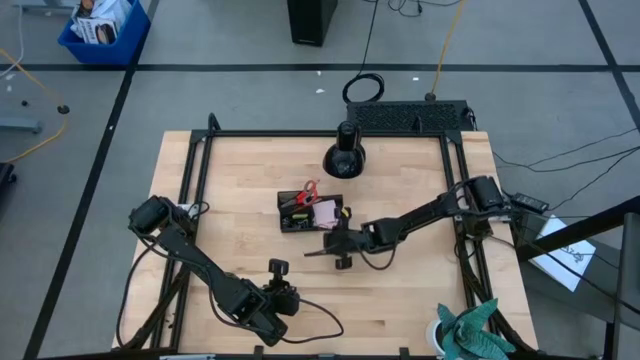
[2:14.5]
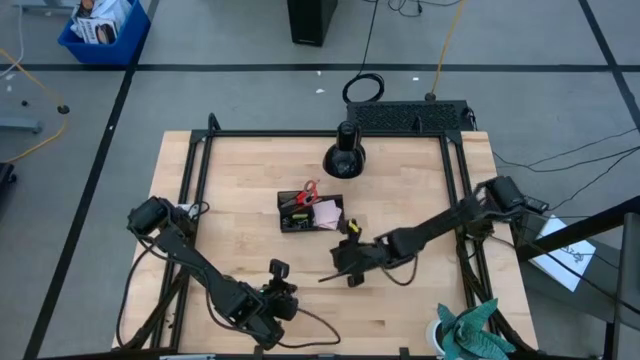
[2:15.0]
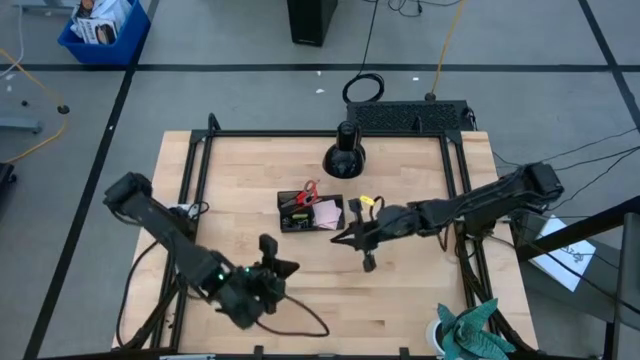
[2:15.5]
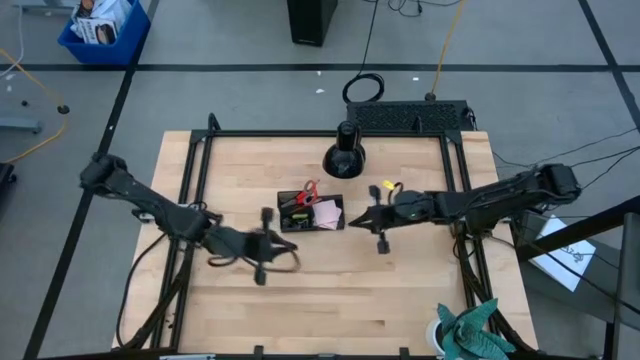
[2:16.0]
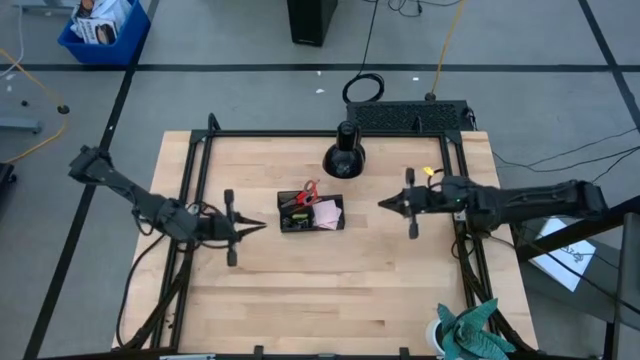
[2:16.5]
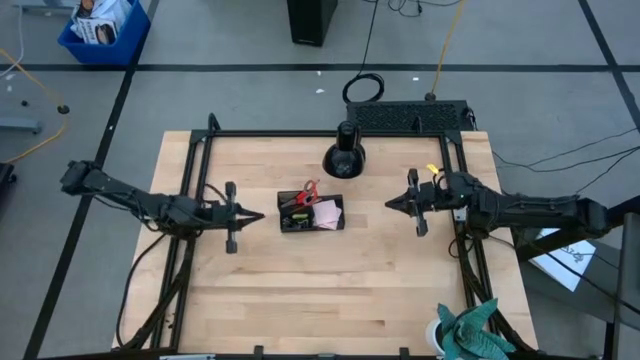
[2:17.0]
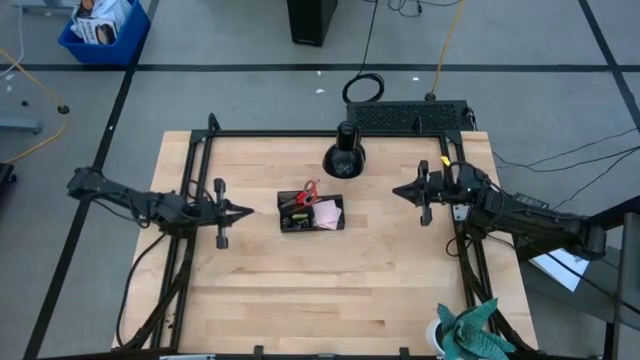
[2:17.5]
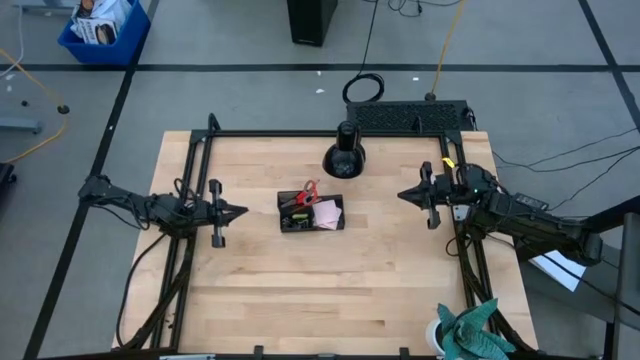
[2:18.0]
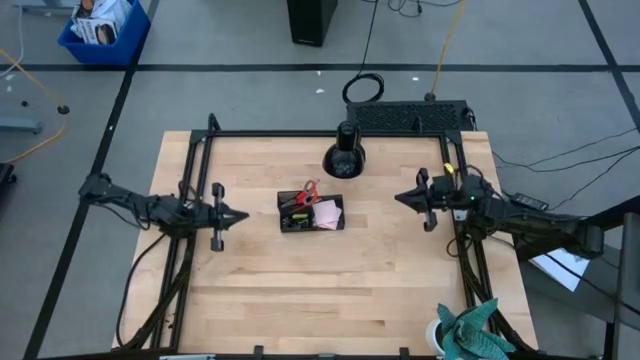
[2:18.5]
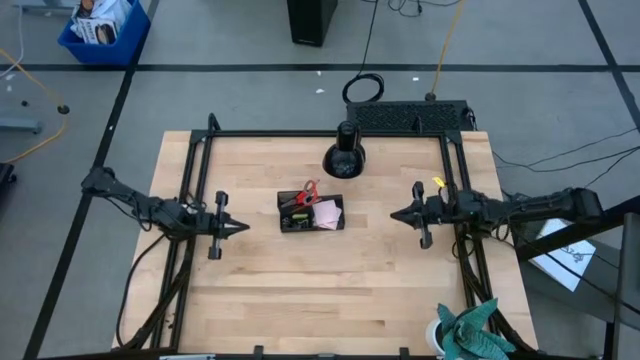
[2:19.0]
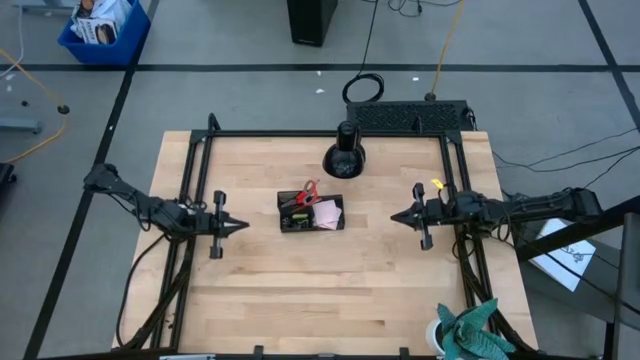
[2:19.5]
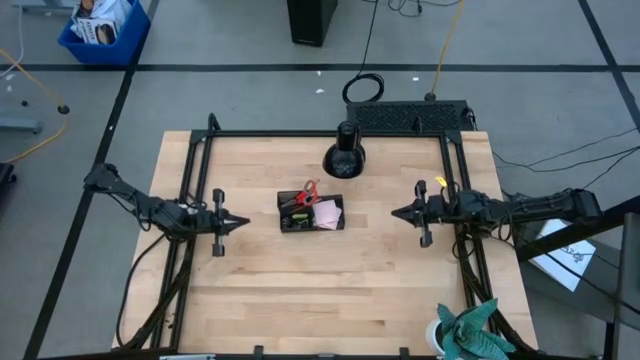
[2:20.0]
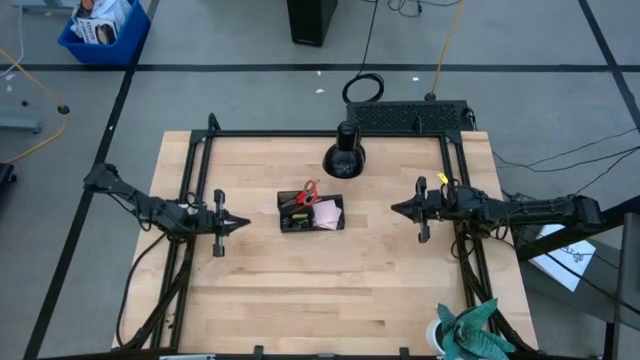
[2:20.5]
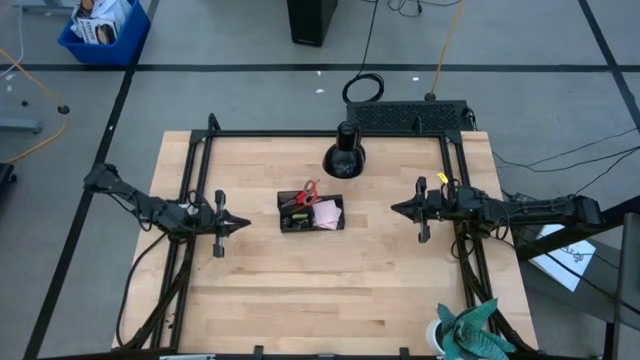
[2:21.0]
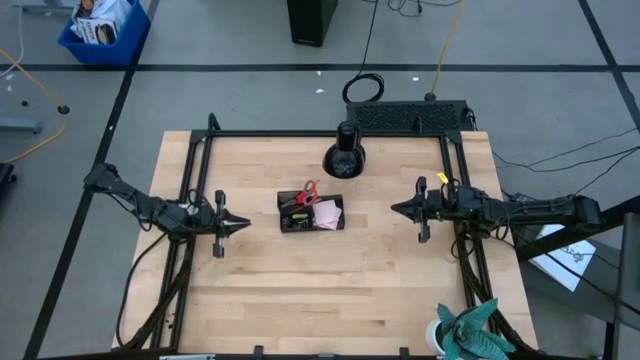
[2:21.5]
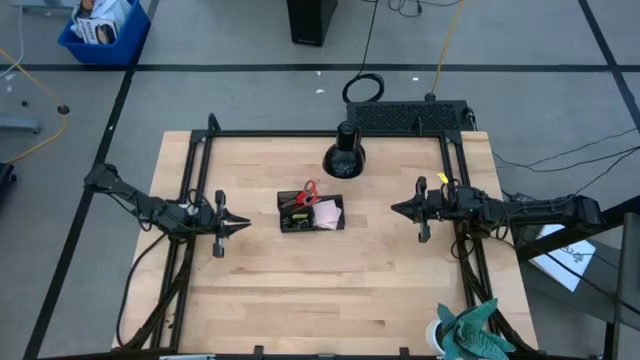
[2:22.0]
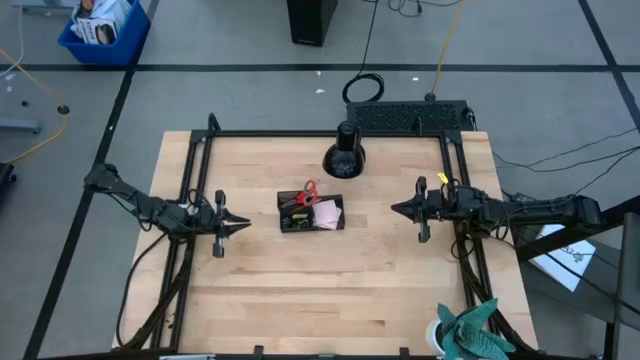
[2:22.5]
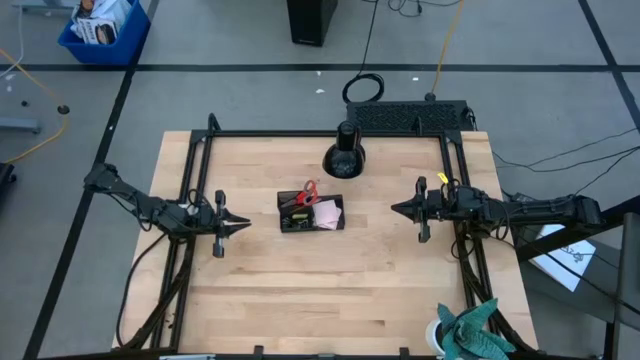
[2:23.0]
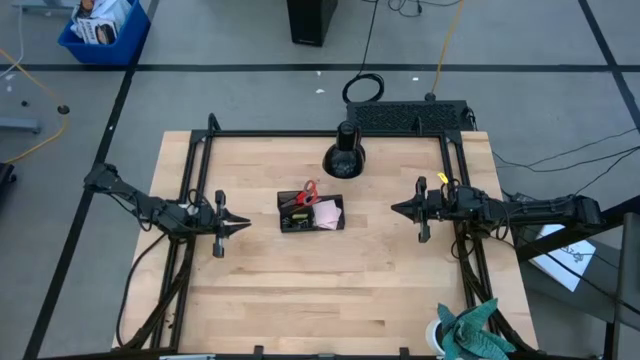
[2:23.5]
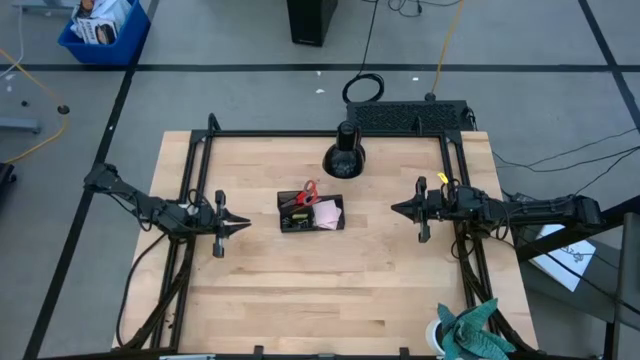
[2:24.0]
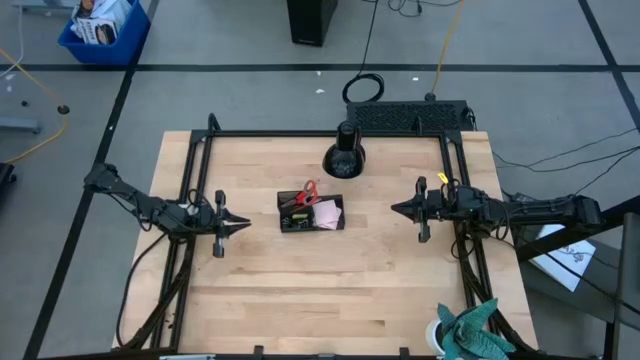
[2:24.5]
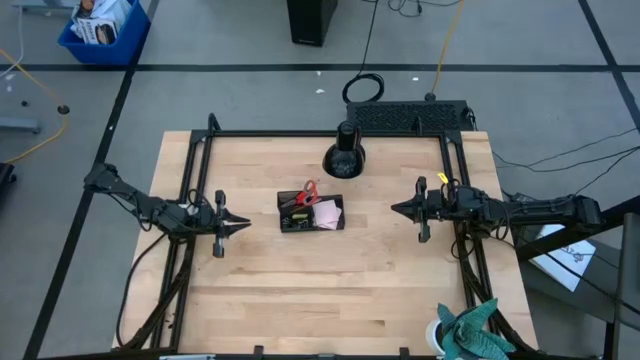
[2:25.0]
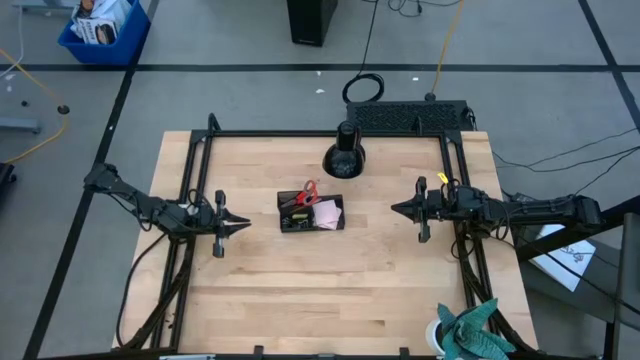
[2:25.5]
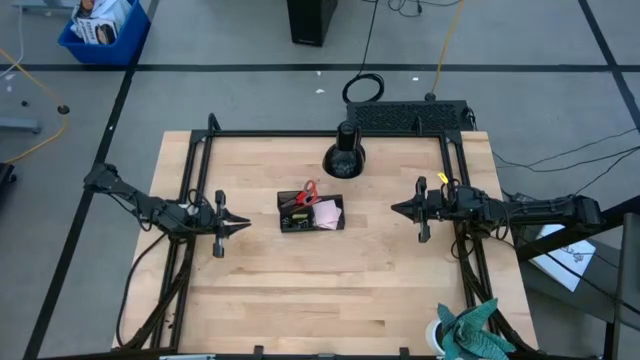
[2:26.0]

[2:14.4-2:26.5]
Task: Pick and place office supplies into organizer
Return to Home Position

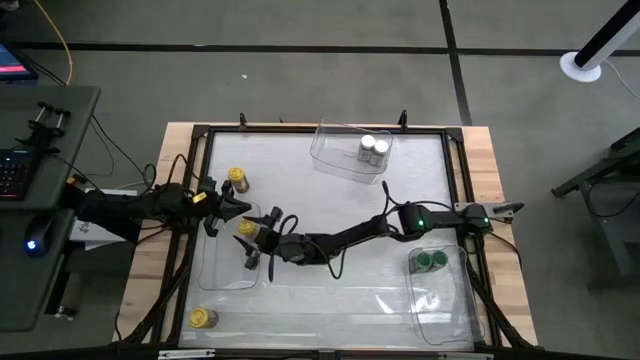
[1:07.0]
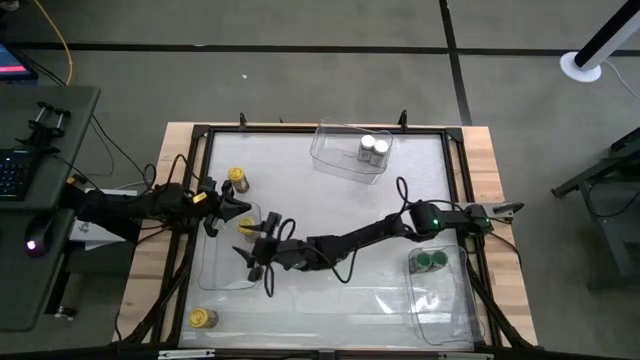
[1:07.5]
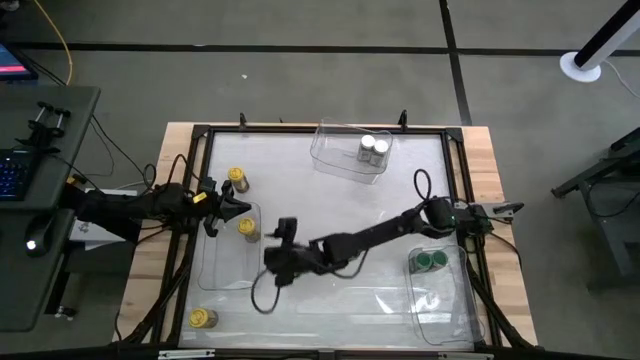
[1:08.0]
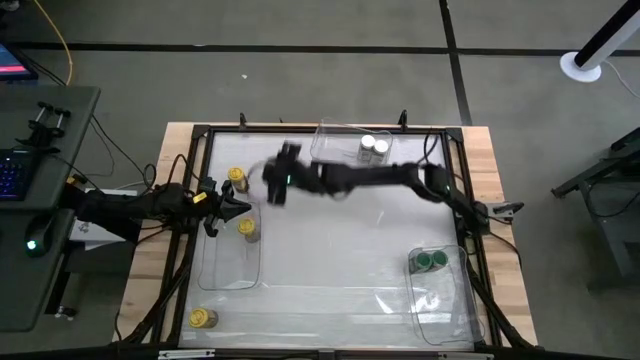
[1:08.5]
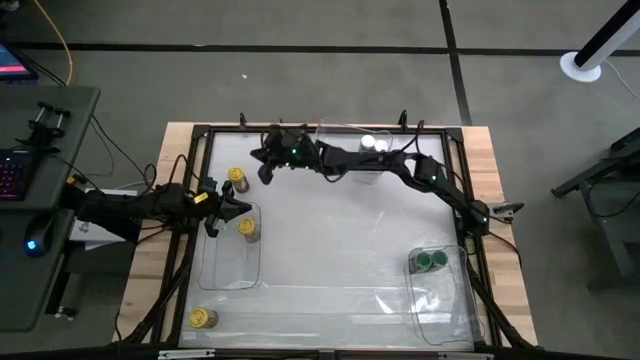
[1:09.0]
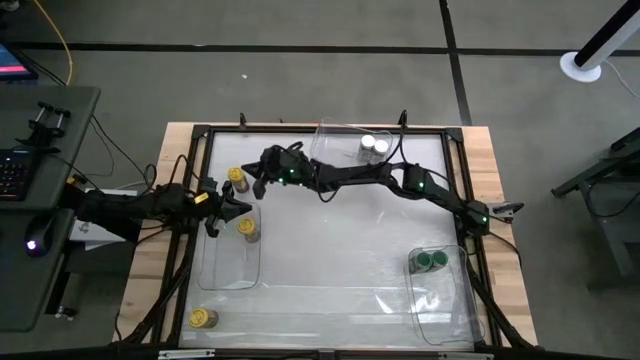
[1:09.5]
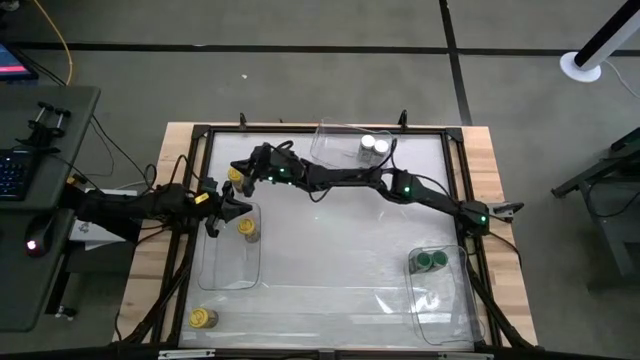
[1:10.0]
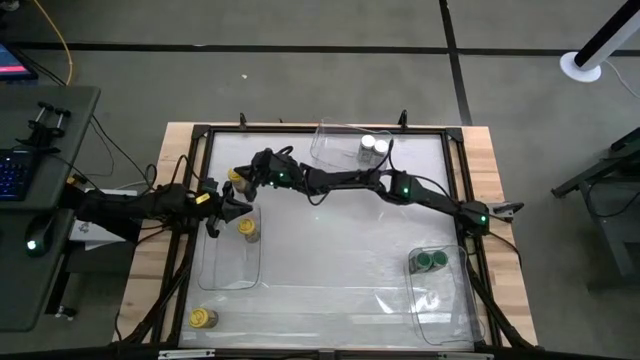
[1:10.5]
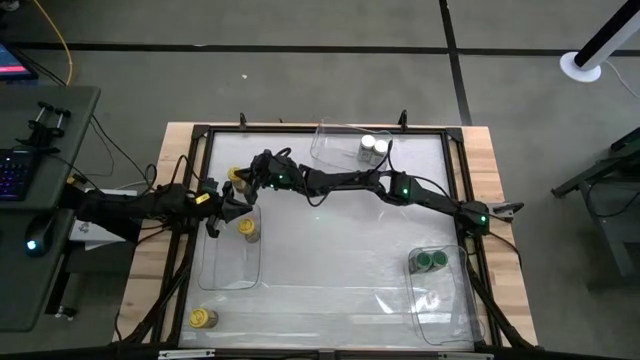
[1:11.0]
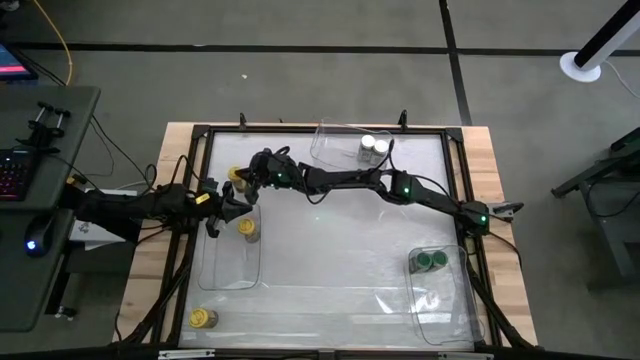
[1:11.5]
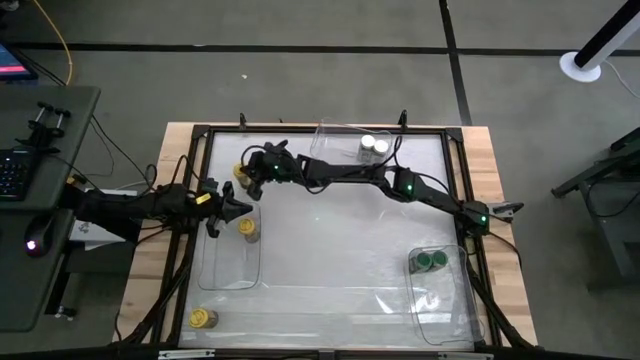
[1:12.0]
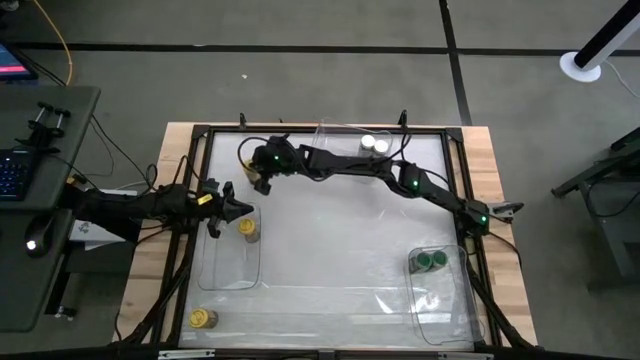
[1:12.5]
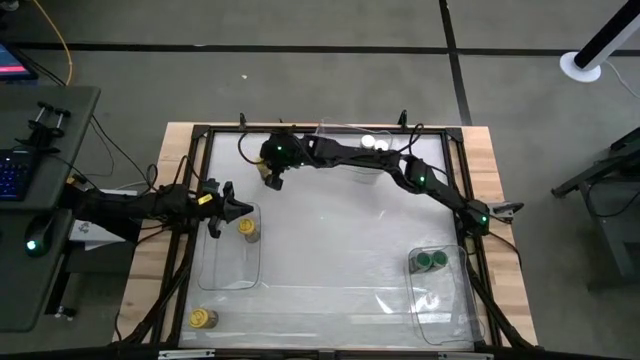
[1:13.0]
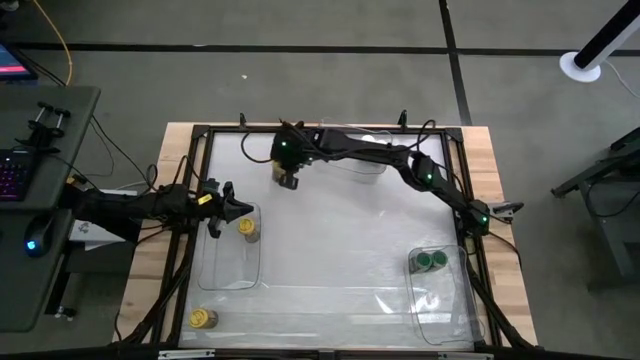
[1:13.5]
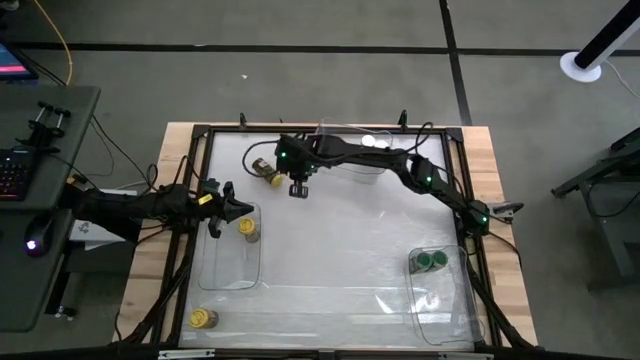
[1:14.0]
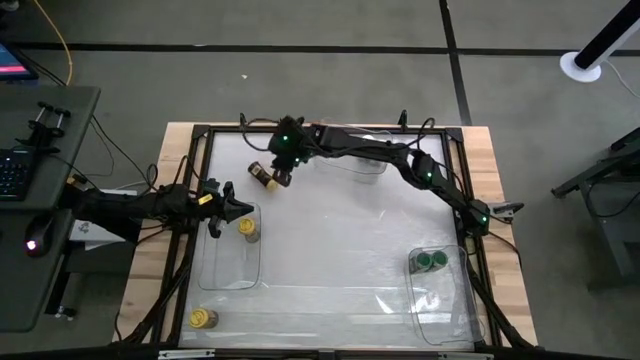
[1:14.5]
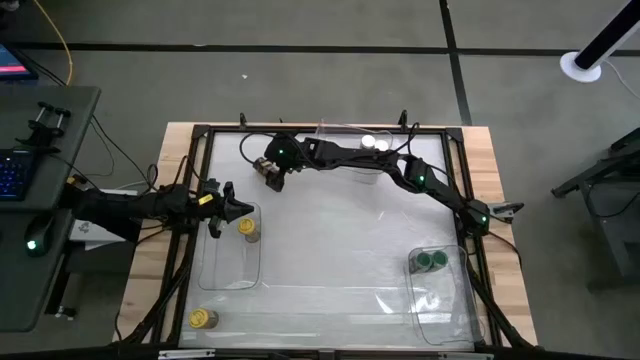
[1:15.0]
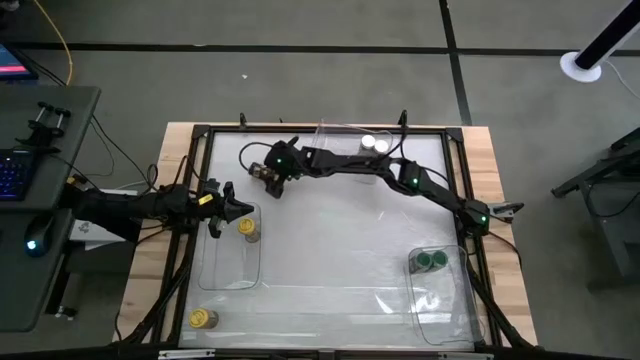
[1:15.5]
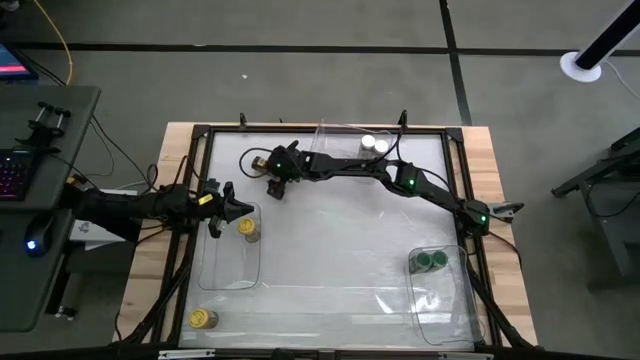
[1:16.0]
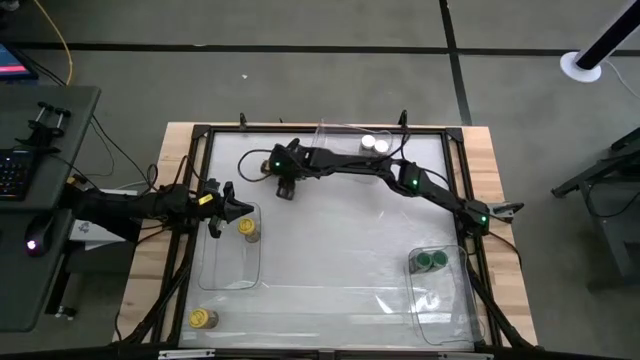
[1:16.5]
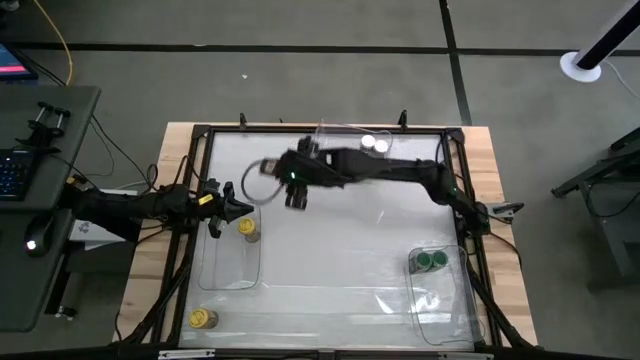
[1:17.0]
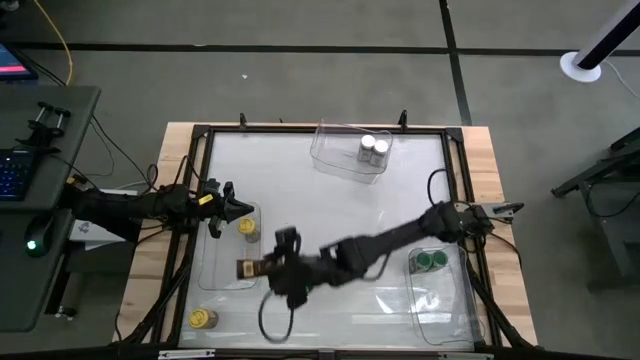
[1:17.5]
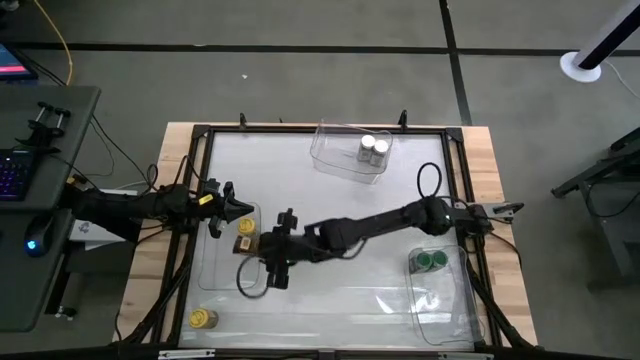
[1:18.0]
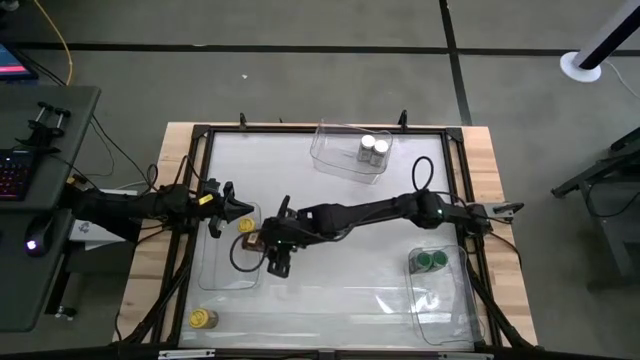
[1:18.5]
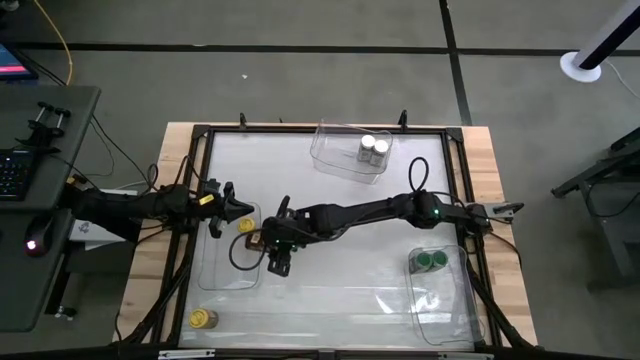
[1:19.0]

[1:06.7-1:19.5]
Task: Sort spices by type
Put the top yellow seasoning bottle into the left transparent bin
